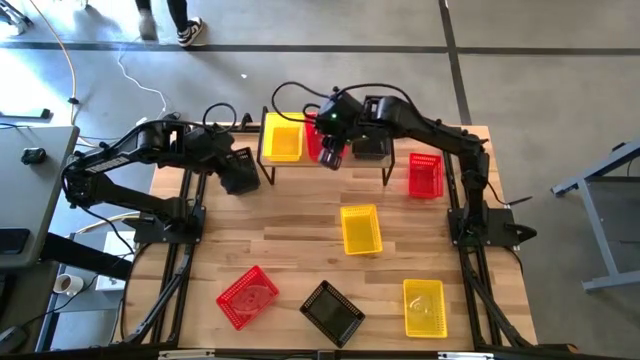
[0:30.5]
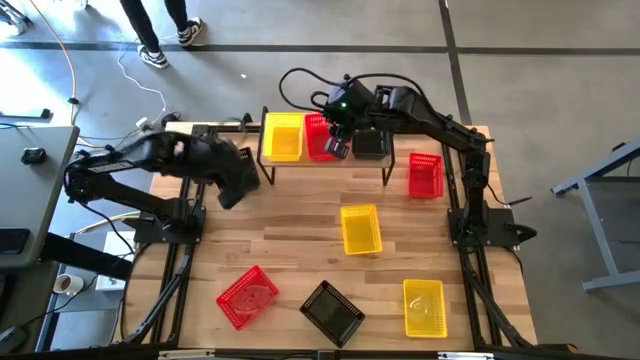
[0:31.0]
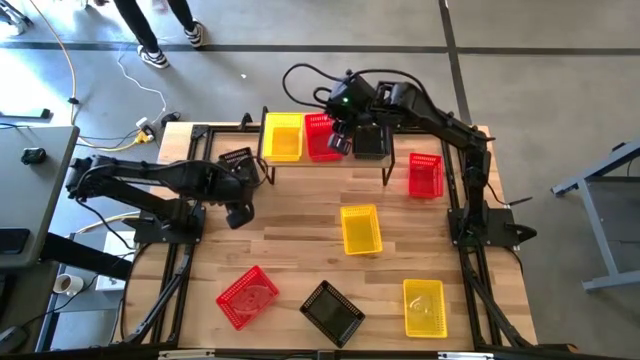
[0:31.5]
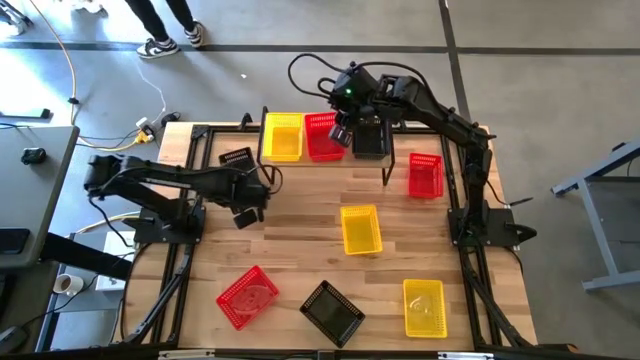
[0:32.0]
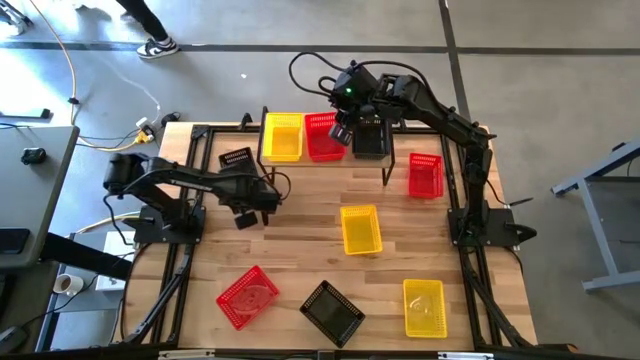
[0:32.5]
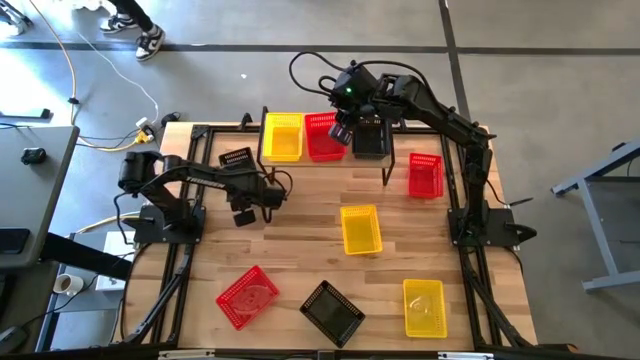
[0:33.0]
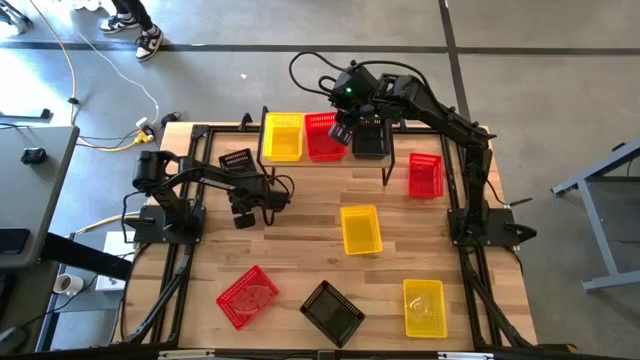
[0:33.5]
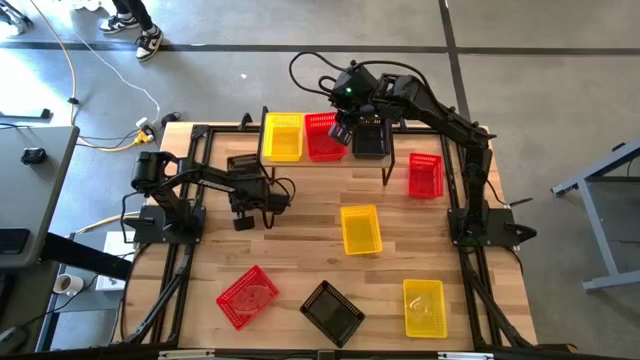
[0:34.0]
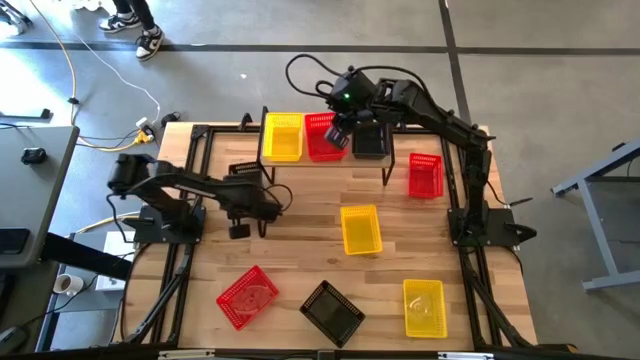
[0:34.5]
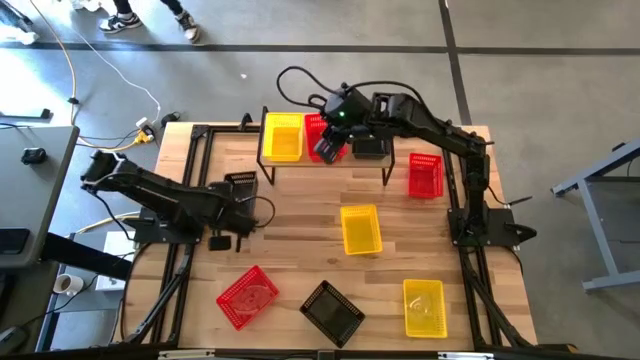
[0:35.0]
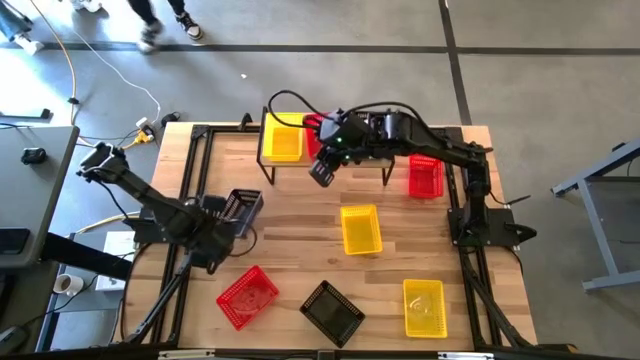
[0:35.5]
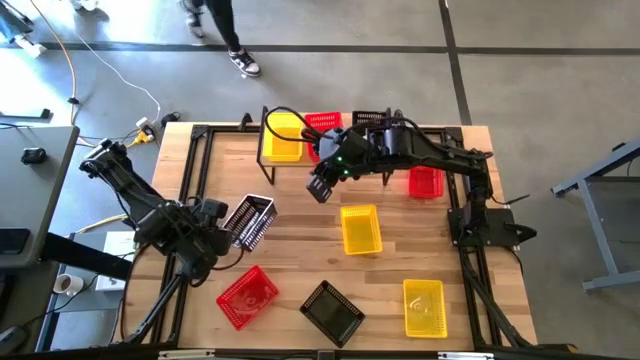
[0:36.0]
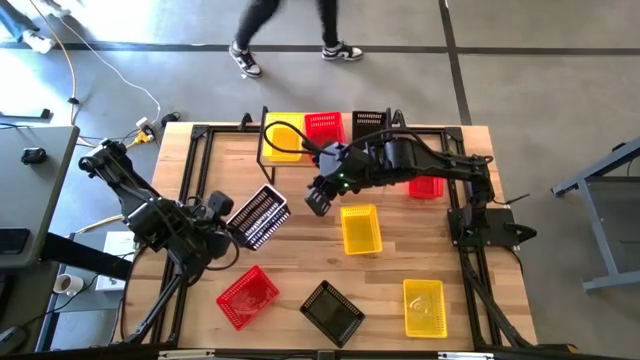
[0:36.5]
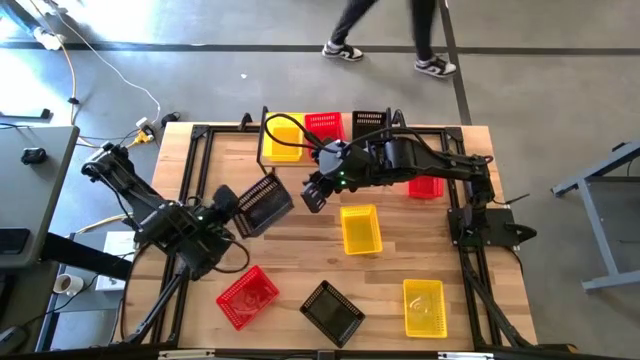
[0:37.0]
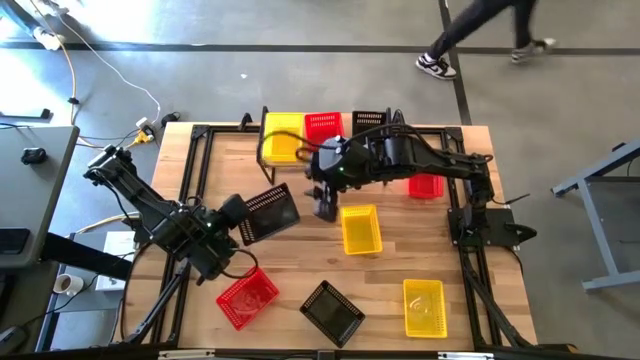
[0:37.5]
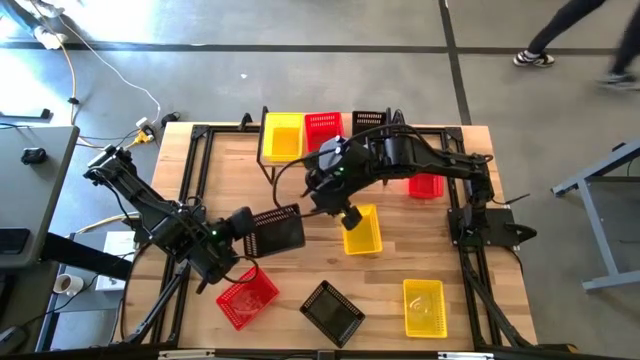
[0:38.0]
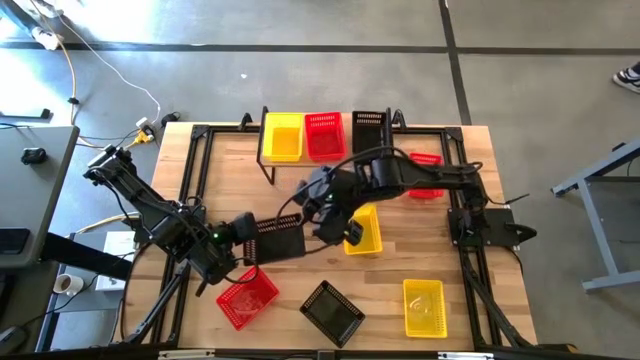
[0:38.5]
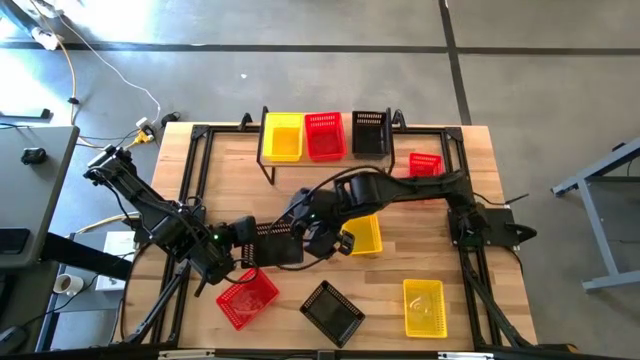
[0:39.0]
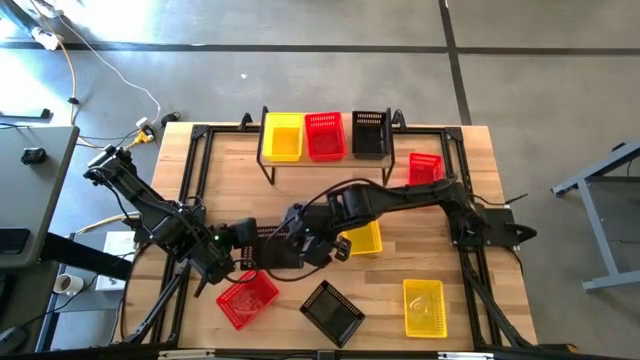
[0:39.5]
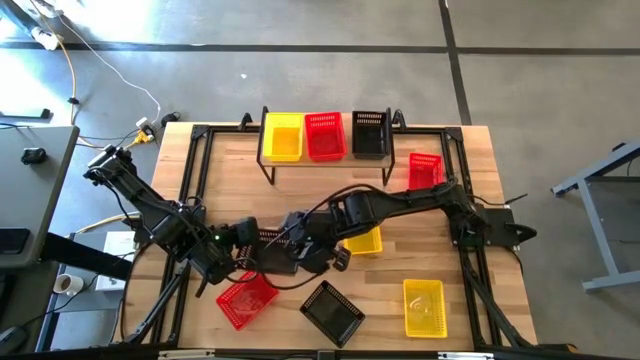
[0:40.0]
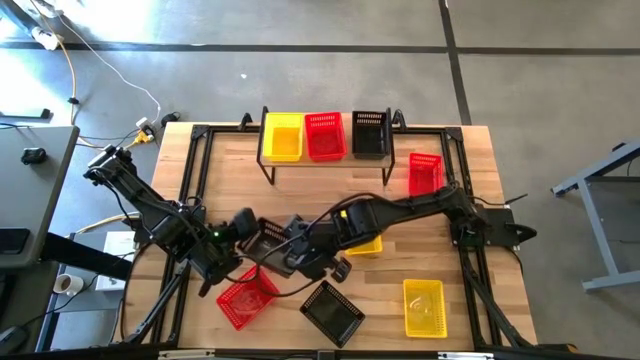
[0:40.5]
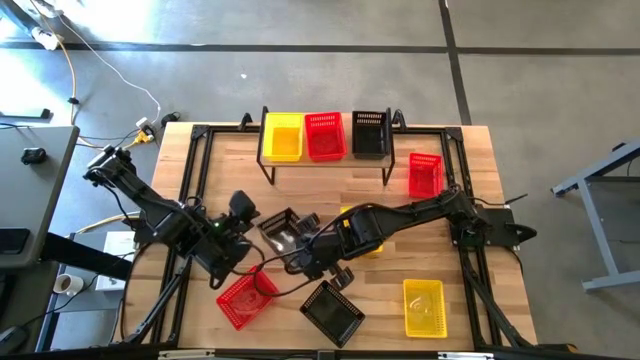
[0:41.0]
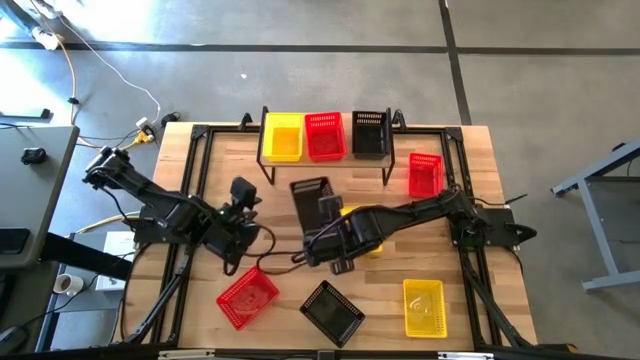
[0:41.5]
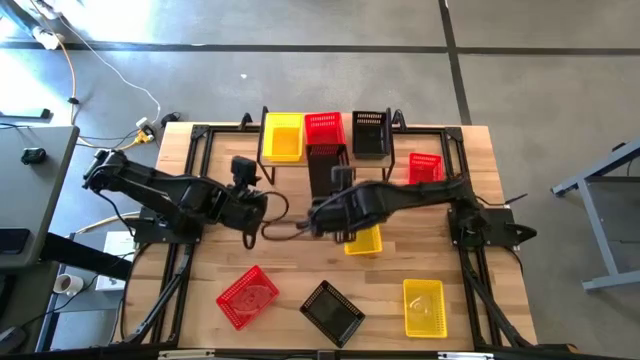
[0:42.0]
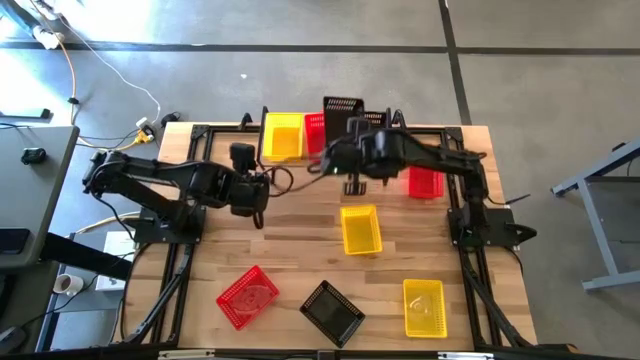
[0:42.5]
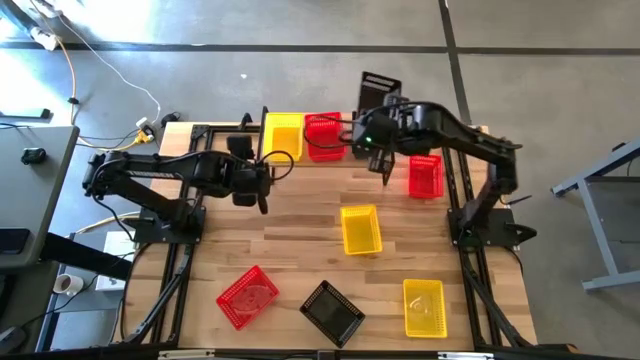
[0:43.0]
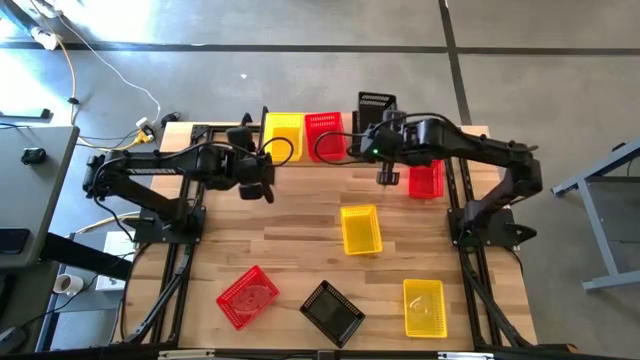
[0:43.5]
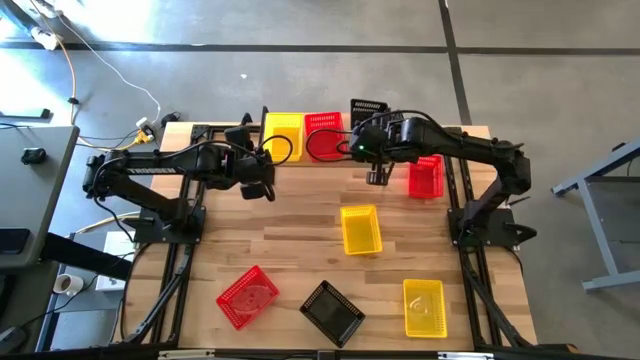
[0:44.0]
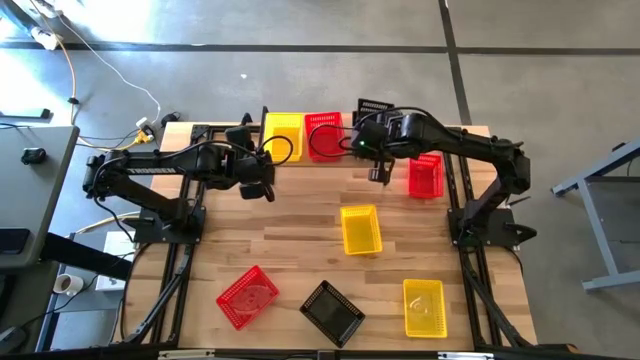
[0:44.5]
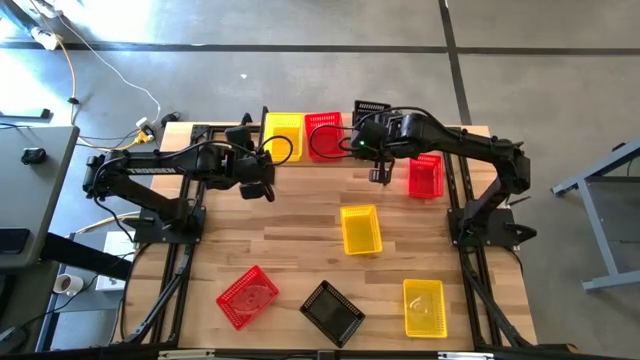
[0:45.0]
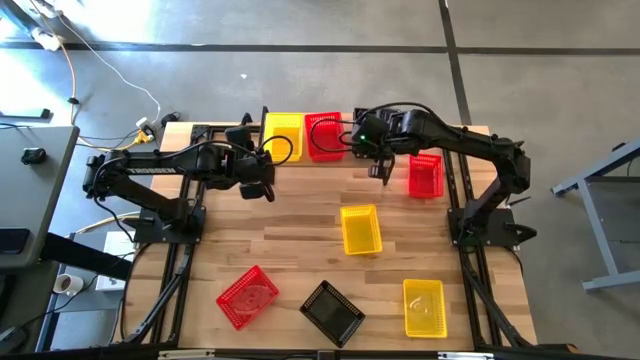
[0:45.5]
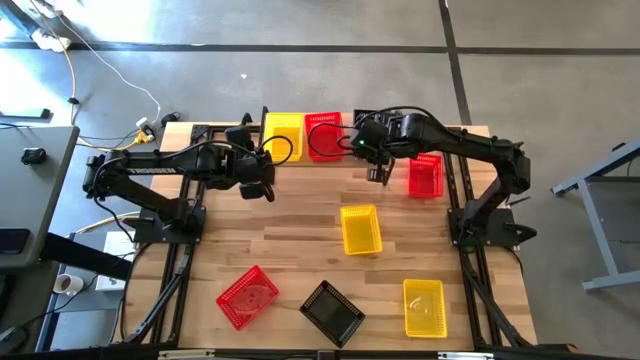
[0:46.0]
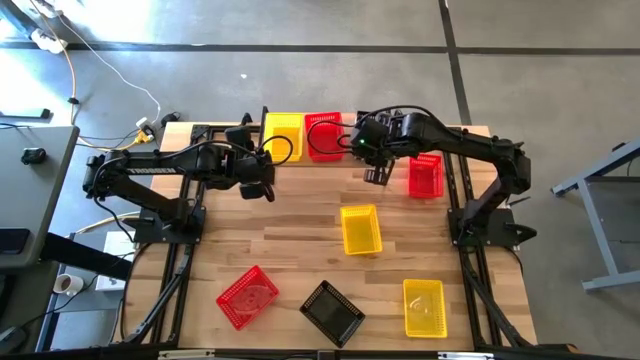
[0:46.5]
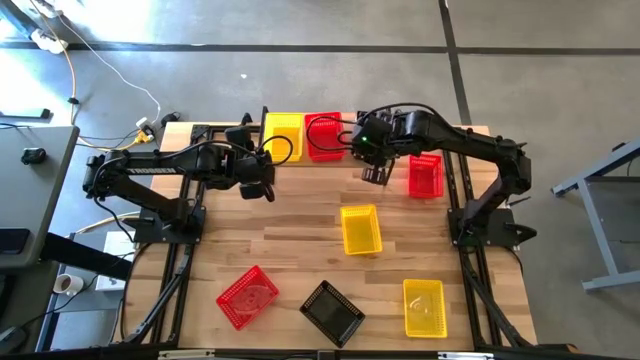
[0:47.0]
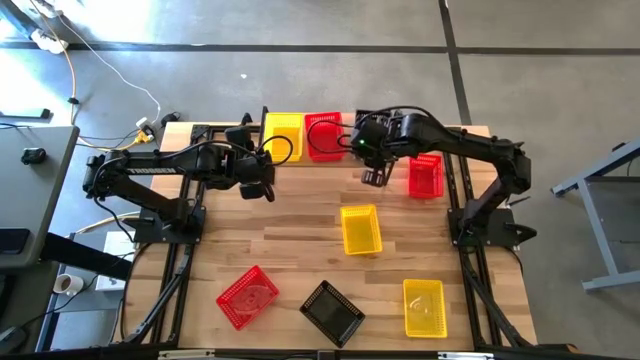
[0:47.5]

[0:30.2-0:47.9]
Task: Stack baskets on shelf by color
Stack the top black bin on the black bin on the shelf

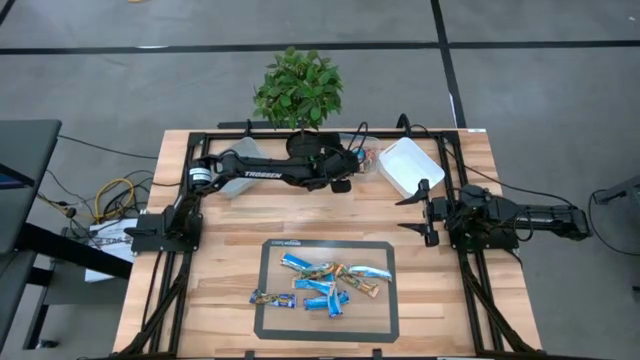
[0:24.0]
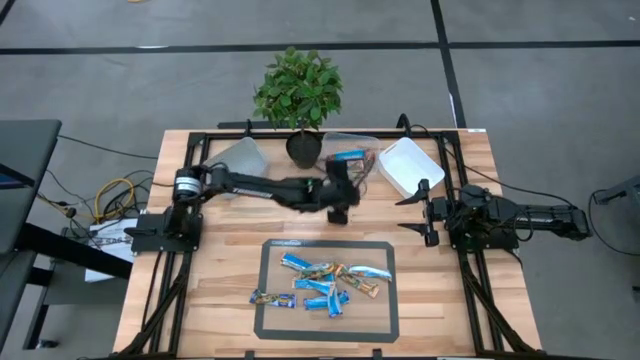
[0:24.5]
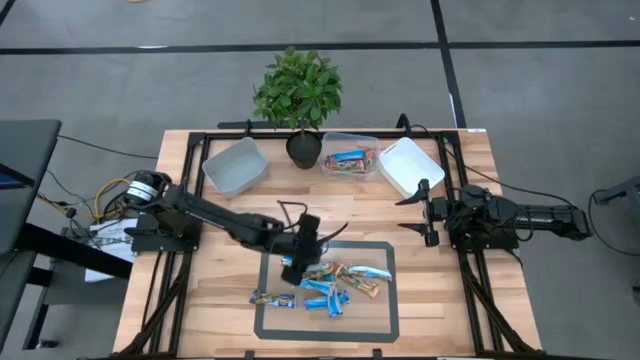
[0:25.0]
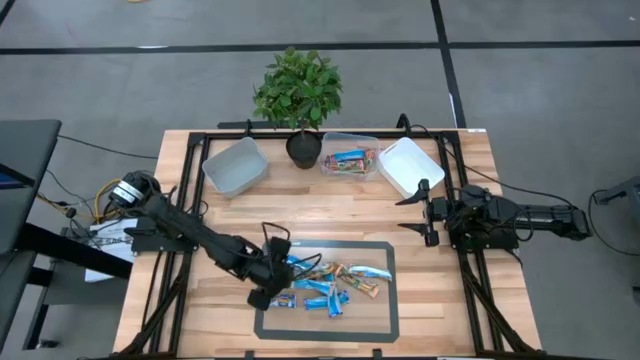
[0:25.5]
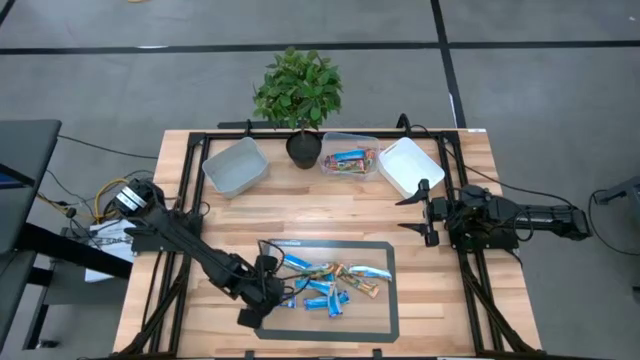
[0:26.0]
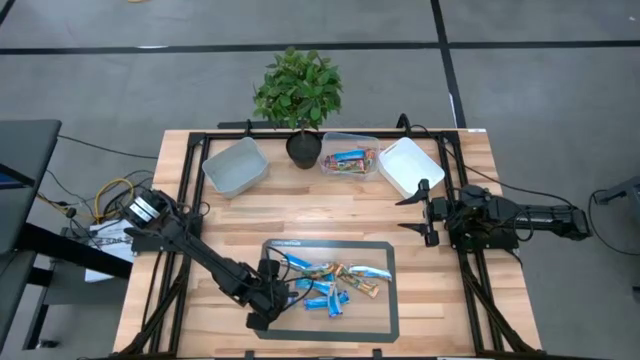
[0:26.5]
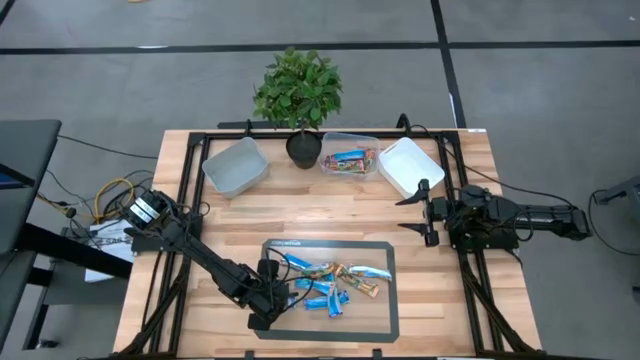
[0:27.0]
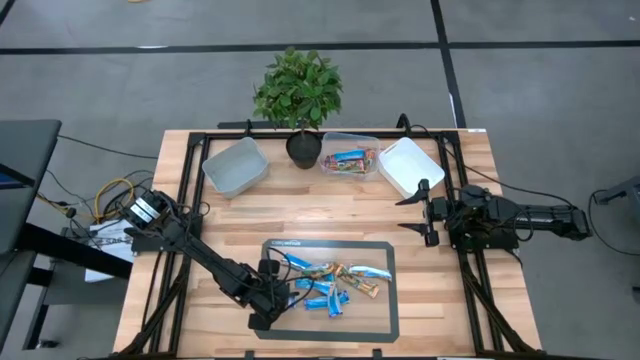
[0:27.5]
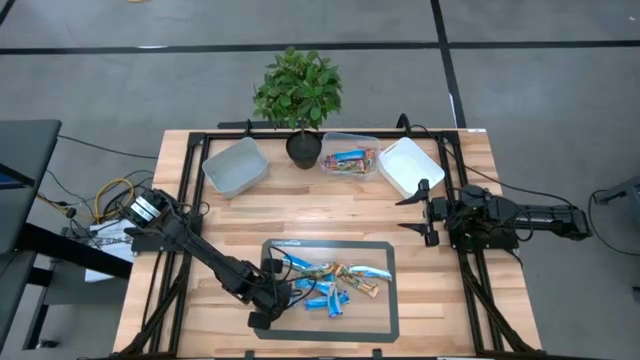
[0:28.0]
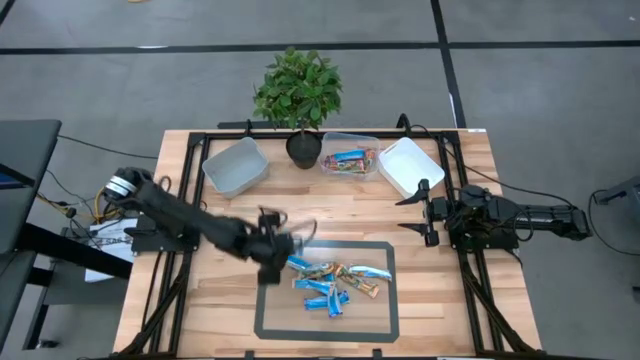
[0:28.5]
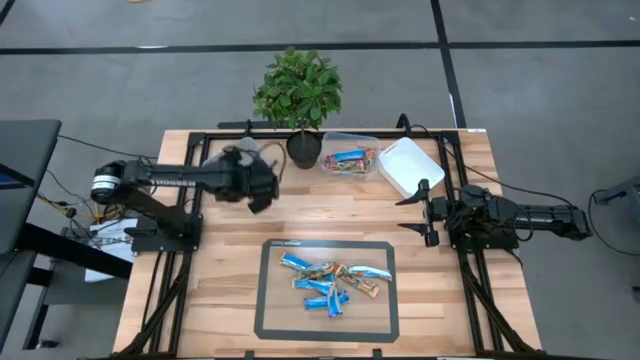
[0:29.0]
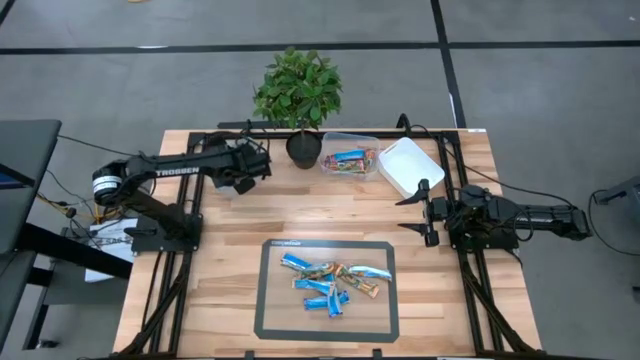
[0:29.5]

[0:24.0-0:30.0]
Task: Pick and place Granola Bars by type
Put the blue granola bar into the gray bin
